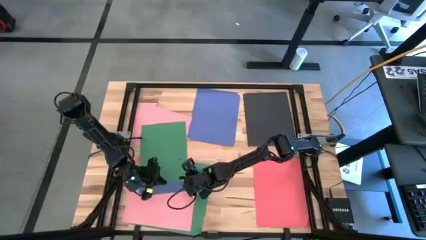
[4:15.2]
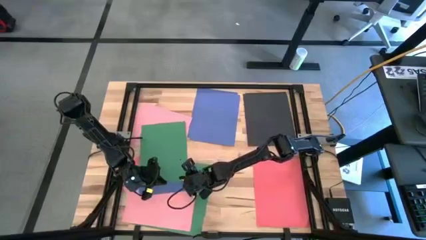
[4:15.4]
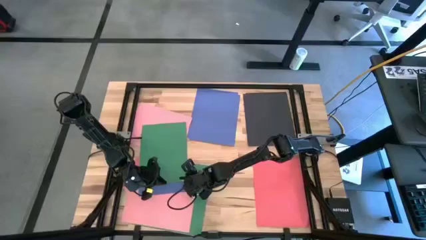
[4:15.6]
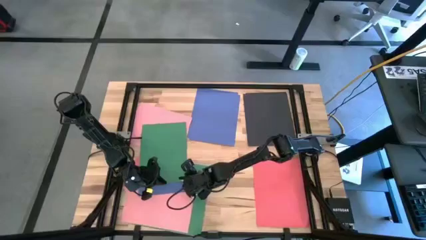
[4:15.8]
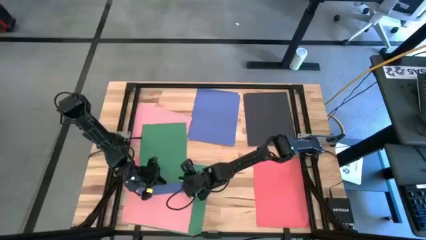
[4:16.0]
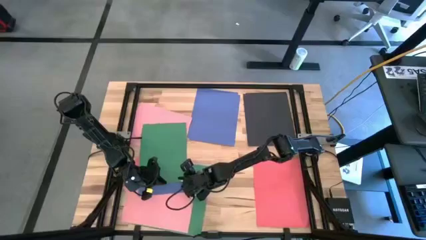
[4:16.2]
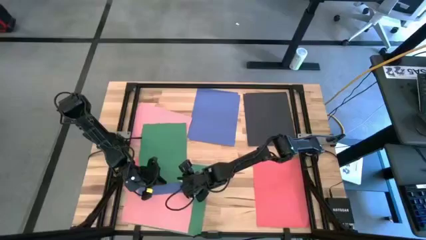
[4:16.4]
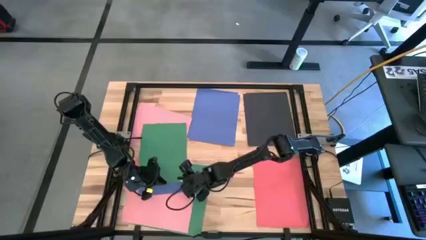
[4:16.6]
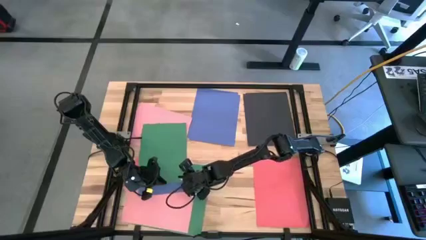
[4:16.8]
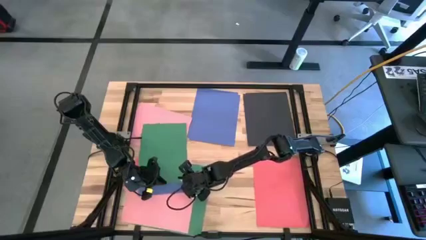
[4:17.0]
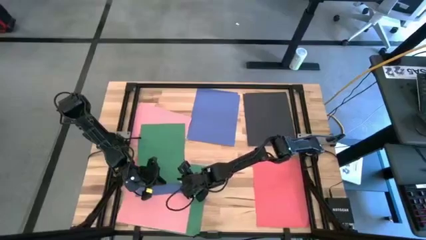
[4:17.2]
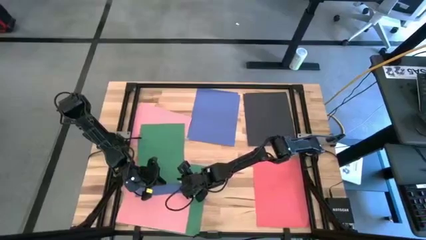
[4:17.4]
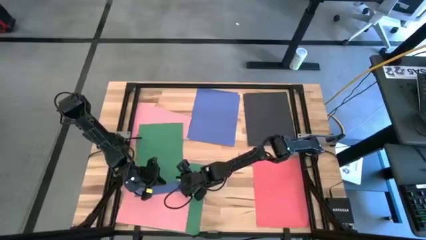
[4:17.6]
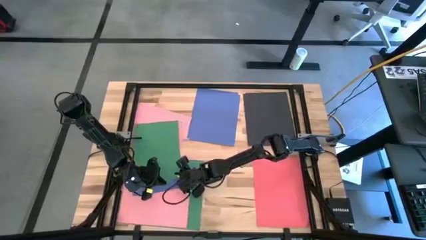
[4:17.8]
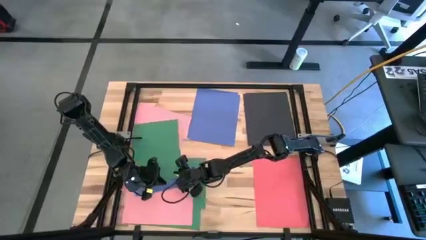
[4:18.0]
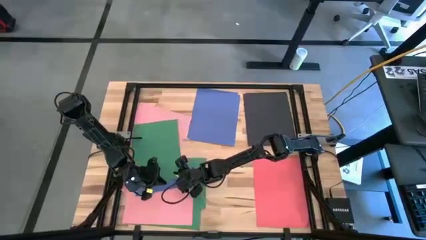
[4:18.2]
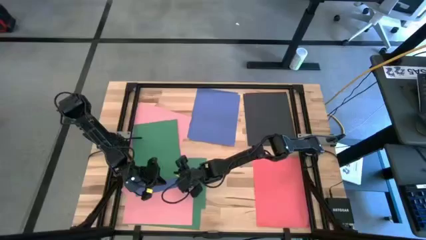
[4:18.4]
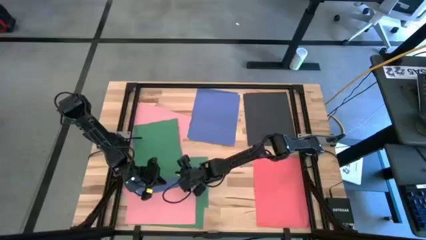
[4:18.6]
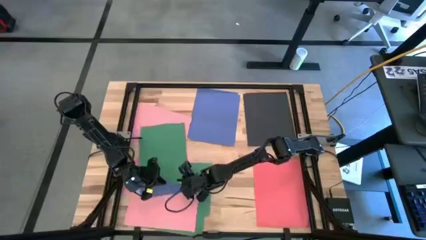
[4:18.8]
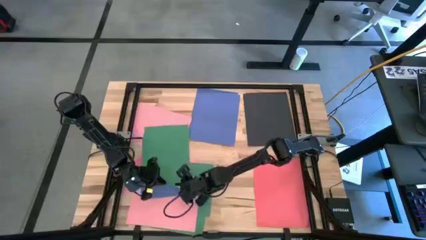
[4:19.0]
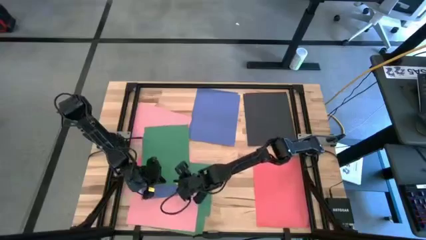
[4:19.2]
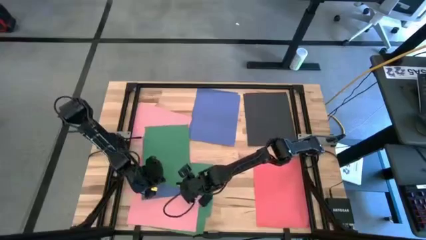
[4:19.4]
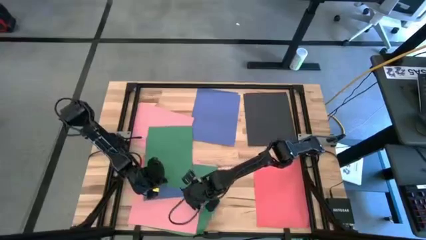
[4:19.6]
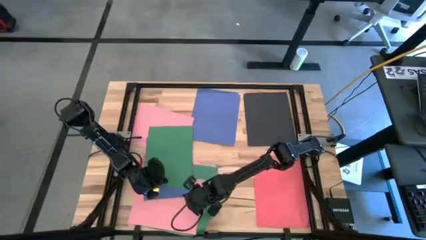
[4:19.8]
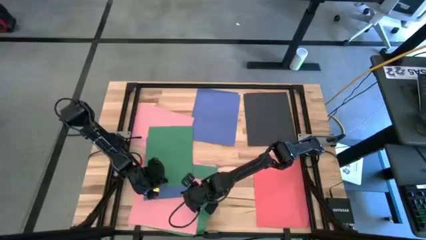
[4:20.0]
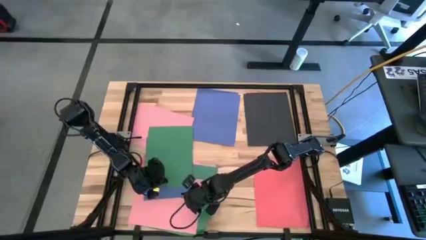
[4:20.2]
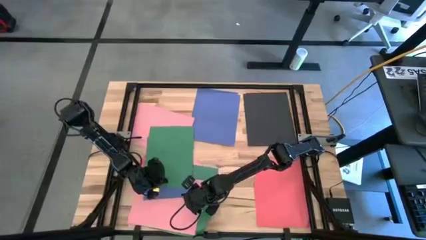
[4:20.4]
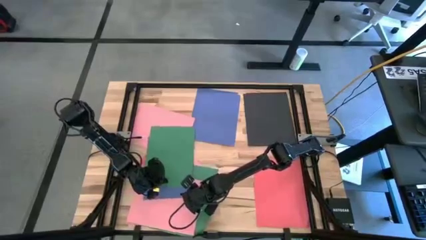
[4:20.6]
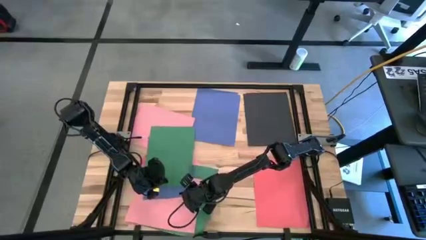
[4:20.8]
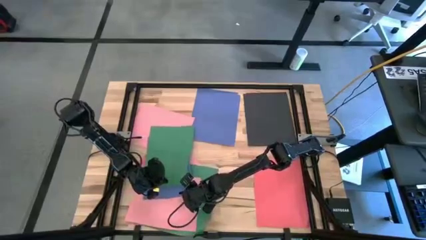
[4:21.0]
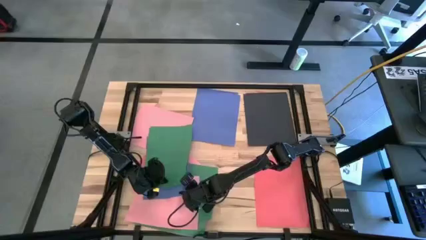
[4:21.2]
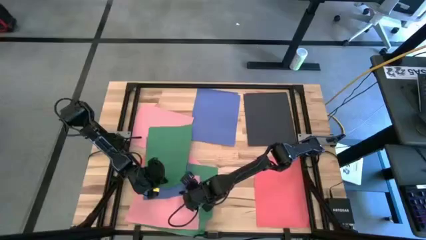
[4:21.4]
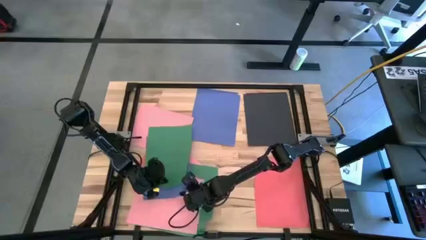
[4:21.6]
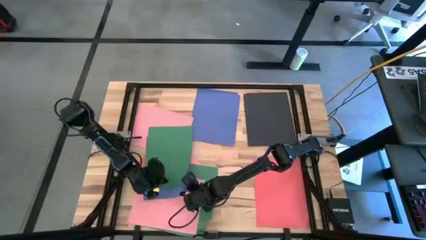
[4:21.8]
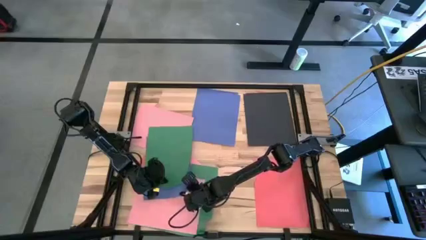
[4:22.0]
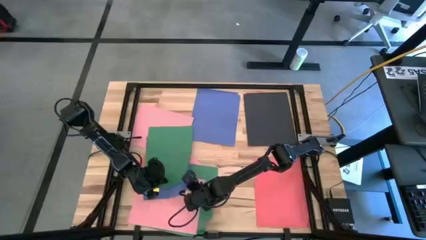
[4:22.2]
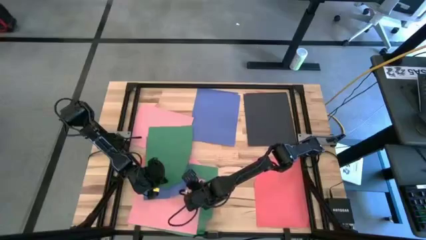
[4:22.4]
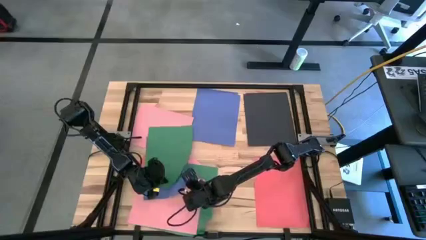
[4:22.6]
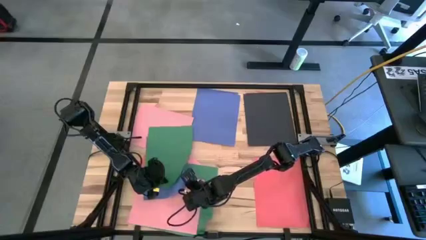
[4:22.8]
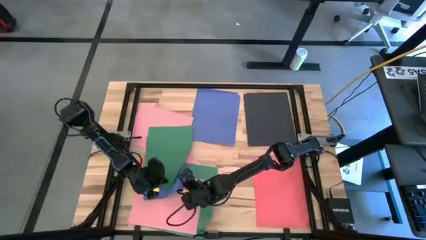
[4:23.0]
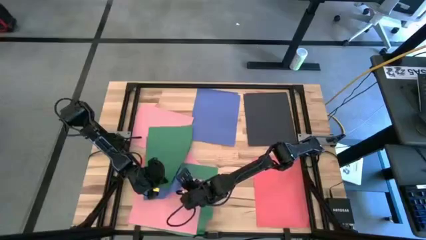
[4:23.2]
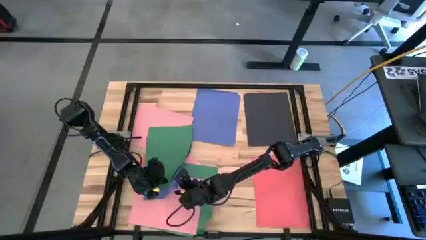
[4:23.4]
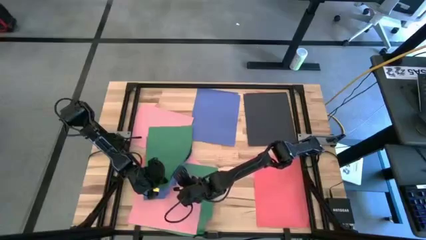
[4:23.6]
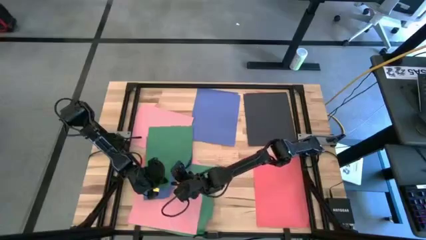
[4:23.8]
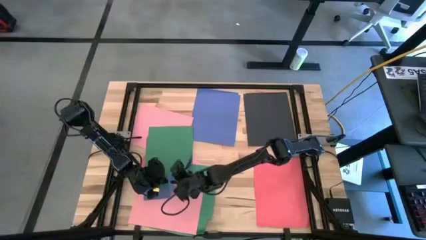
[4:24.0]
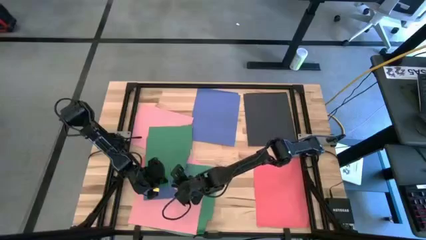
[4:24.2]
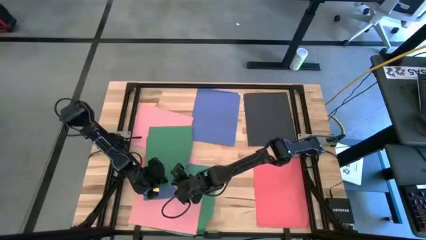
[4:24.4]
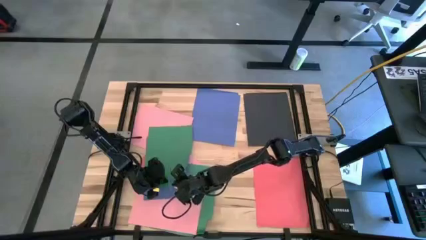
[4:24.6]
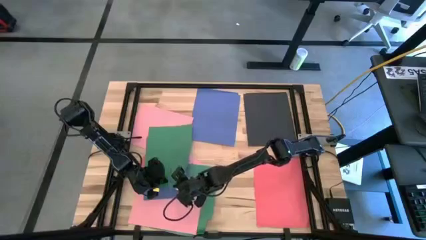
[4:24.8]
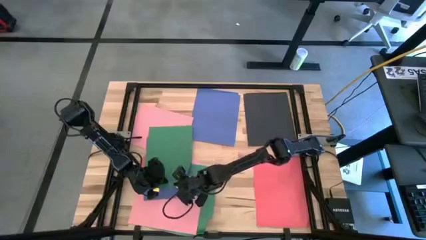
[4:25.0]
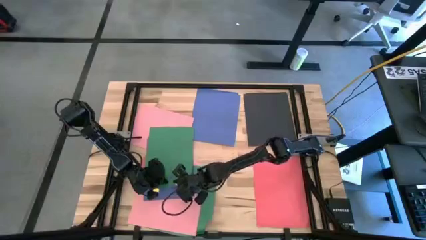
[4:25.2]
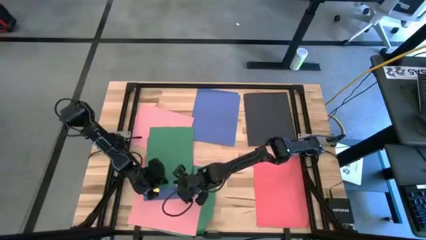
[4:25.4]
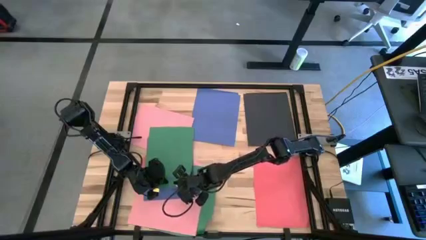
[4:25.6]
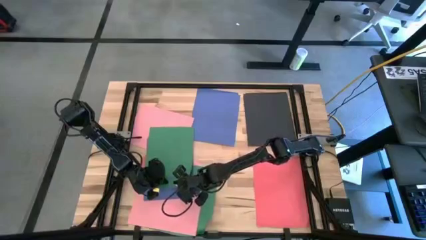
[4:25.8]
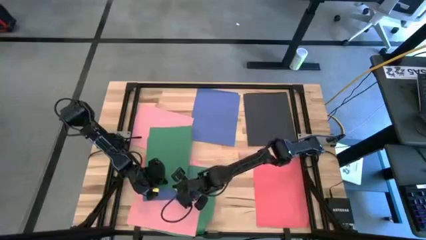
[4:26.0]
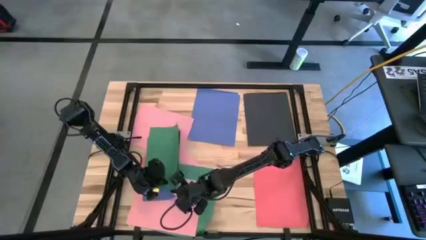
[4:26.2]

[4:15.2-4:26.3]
Task: Organize paper
Stack the blue paper on top of the other blue papers on the table

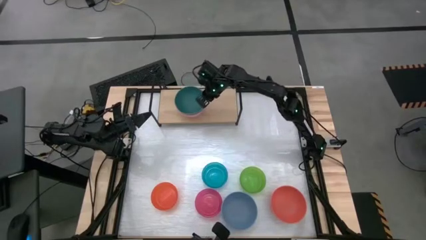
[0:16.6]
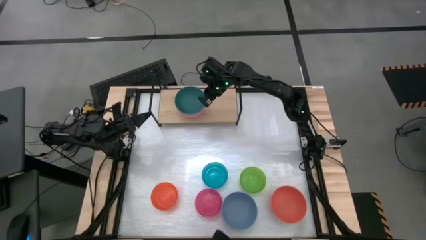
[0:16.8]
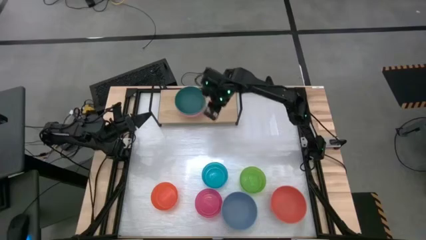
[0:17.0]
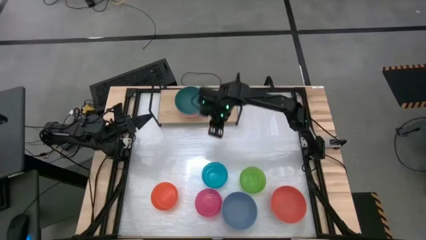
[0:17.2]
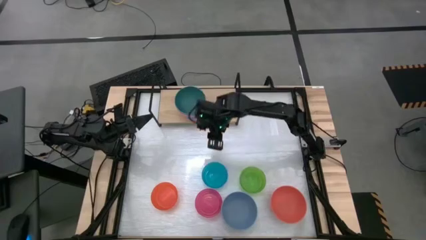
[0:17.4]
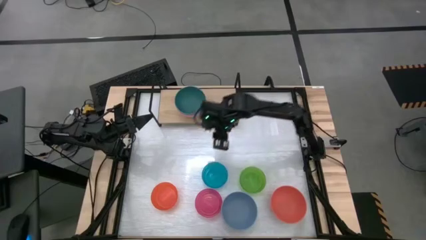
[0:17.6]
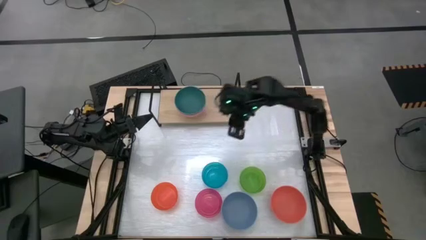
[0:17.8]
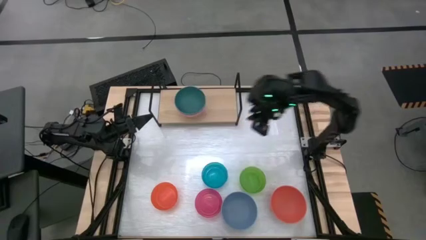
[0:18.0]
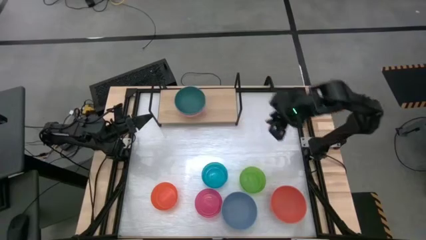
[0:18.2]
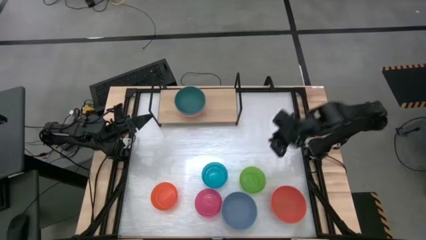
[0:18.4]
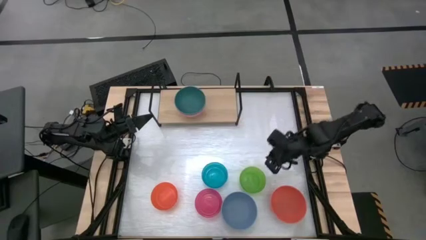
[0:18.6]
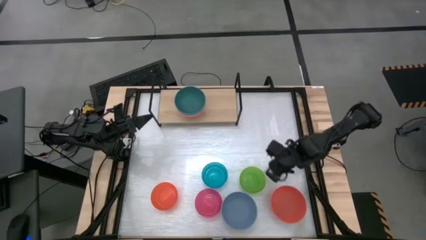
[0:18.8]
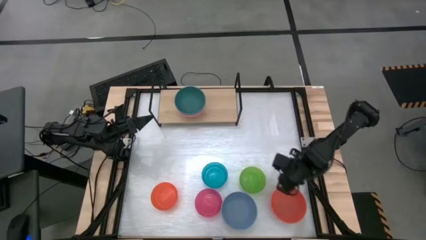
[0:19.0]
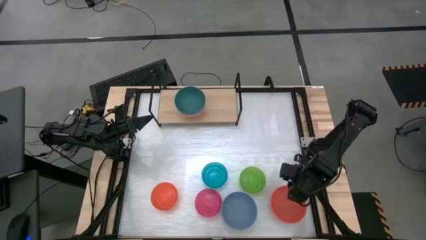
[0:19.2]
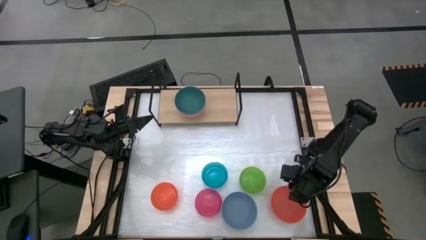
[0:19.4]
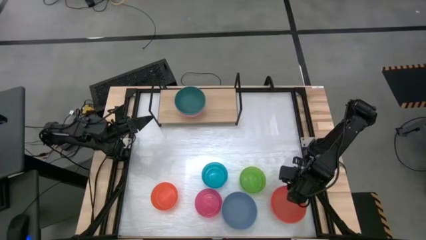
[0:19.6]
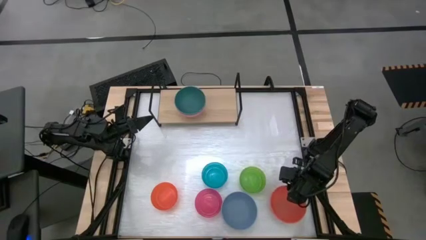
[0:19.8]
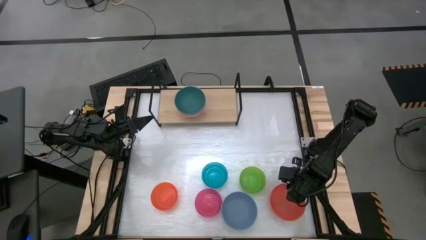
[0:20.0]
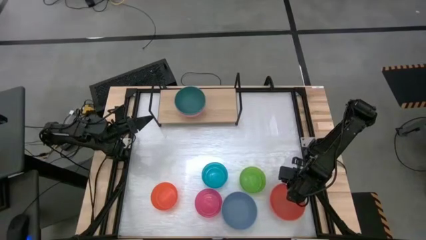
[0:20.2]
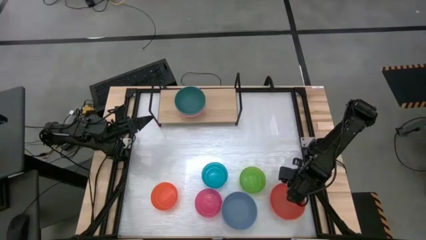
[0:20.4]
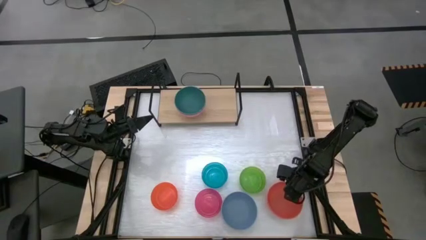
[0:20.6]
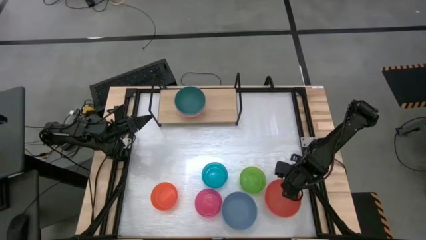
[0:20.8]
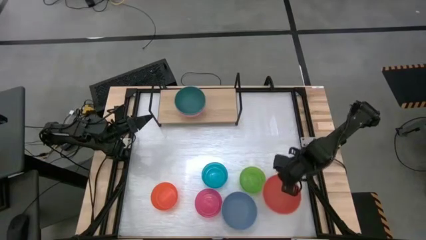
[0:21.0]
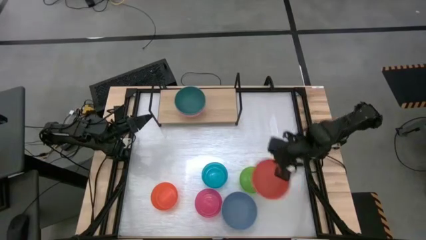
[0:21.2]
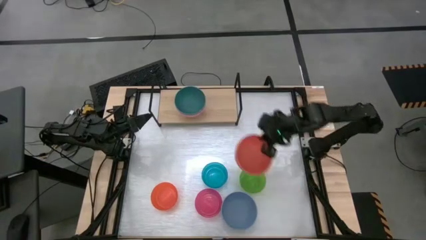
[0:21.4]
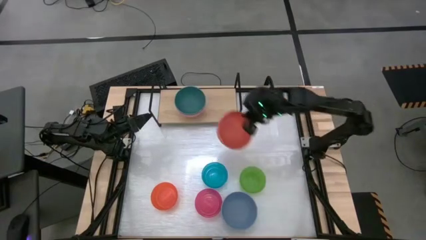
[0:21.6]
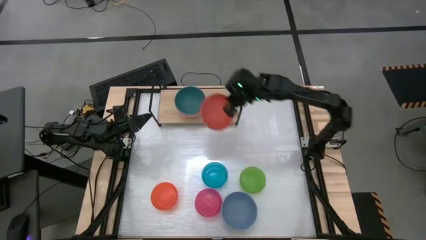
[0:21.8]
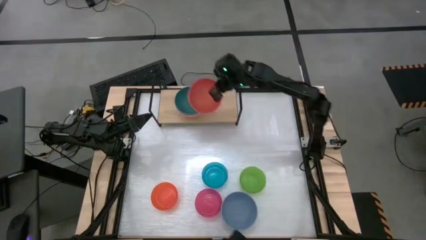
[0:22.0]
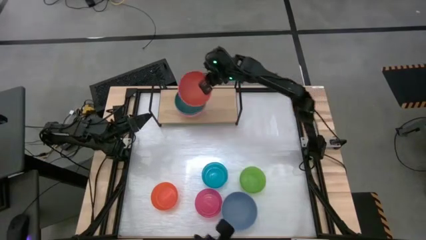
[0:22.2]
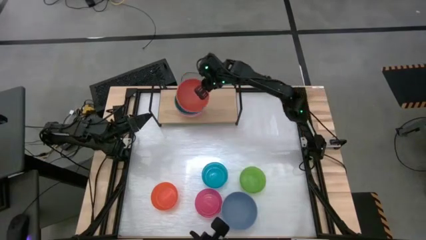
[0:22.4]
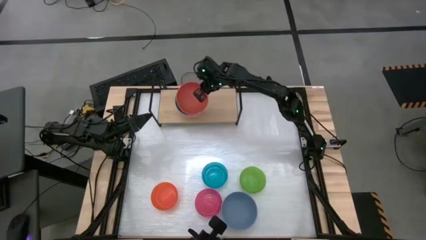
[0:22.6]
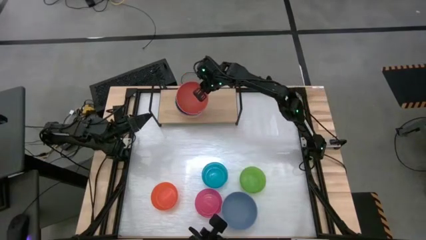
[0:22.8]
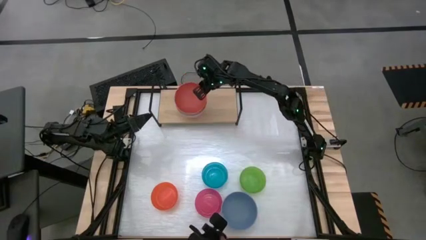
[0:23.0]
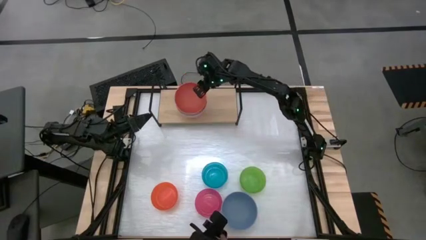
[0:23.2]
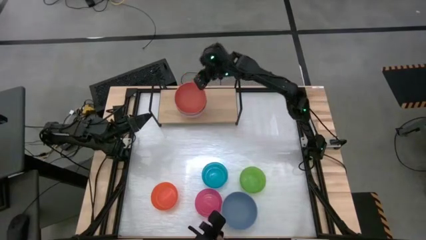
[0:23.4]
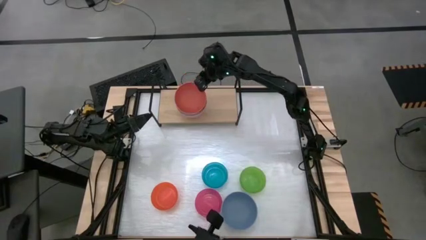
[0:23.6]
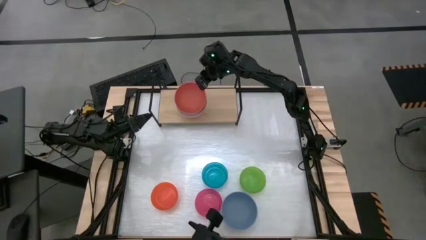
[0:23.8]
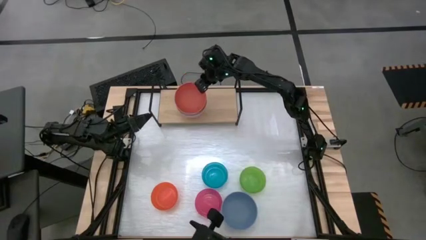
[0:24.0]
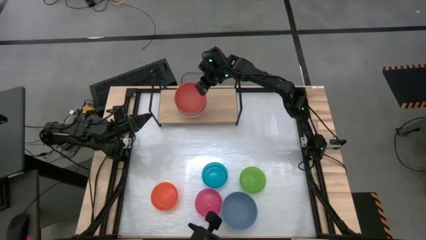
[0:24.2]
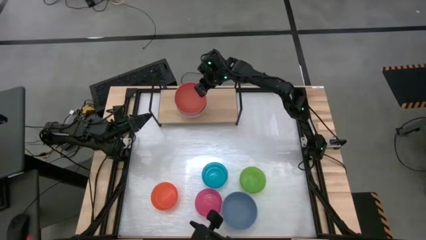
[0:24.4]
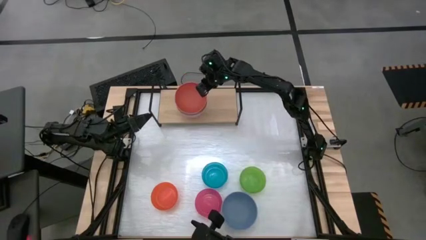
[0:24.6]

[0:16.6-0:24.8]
Task: Place and stack bowls onto a shelf
Stack the orange bowl on top of the green bowl on the shelf
